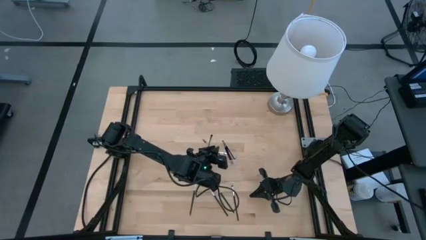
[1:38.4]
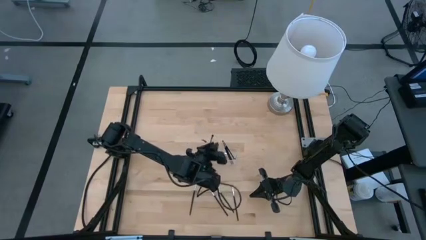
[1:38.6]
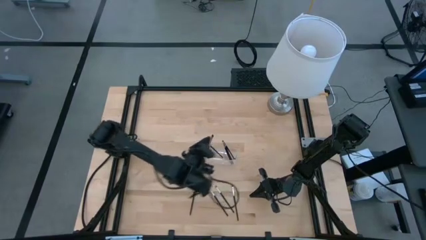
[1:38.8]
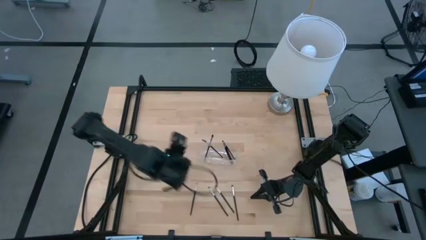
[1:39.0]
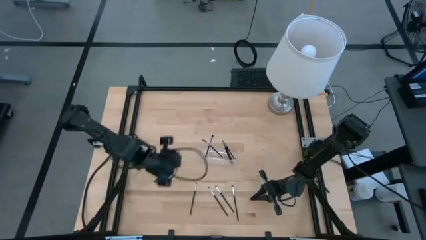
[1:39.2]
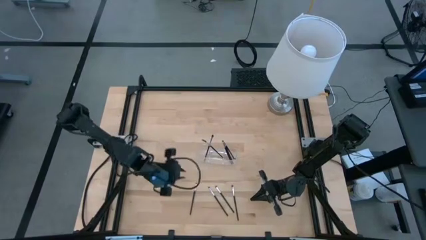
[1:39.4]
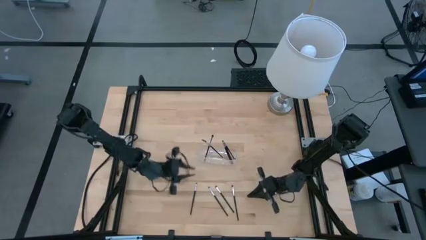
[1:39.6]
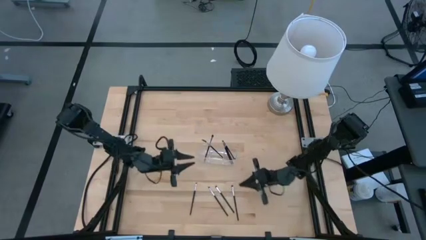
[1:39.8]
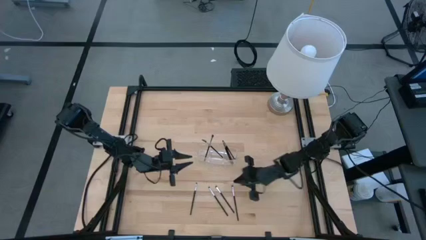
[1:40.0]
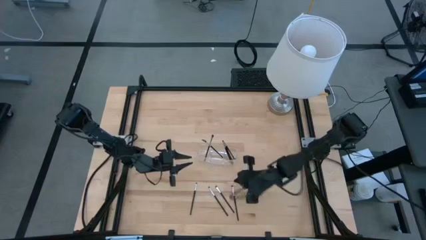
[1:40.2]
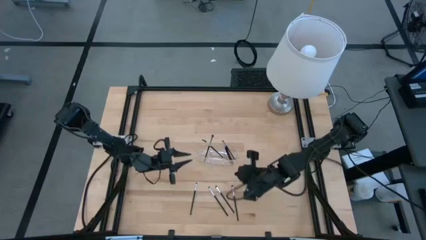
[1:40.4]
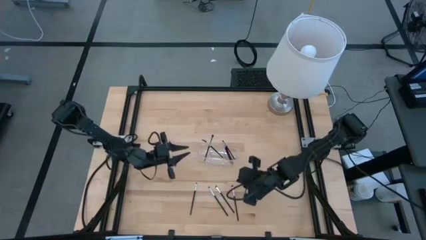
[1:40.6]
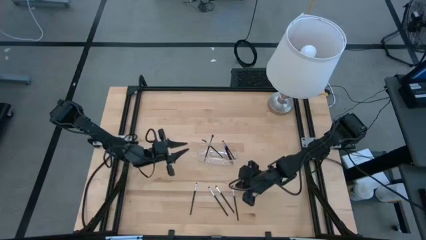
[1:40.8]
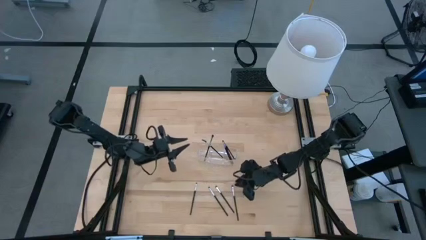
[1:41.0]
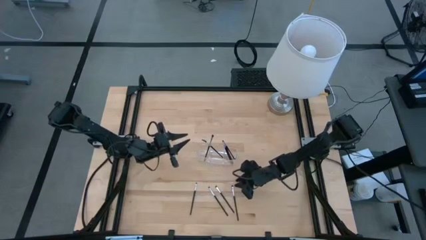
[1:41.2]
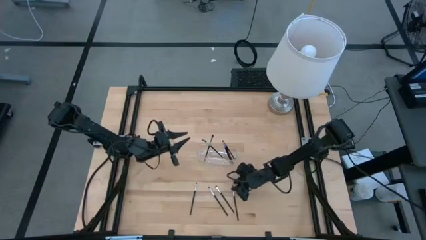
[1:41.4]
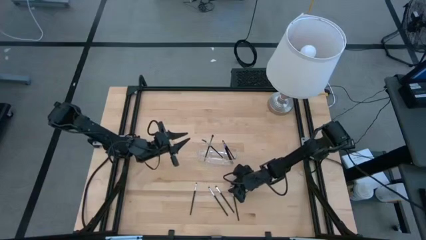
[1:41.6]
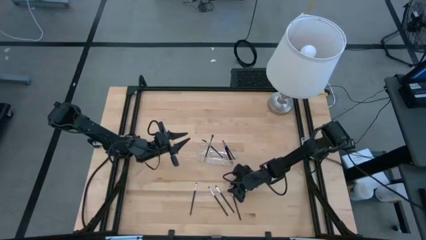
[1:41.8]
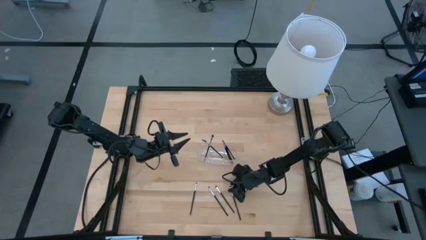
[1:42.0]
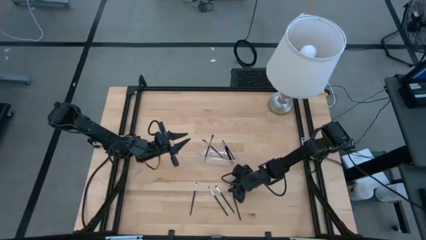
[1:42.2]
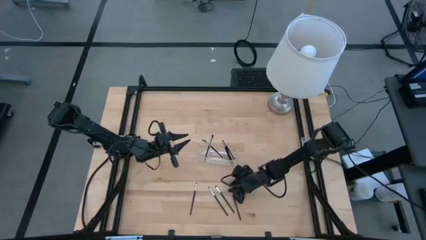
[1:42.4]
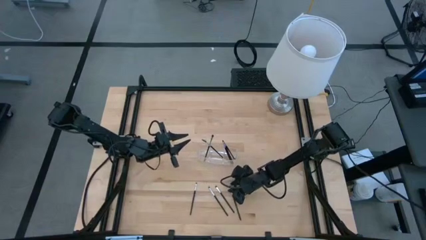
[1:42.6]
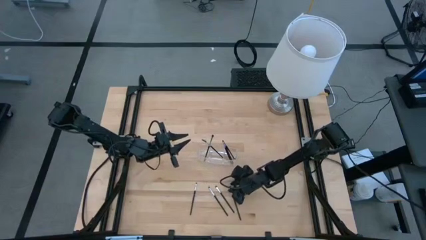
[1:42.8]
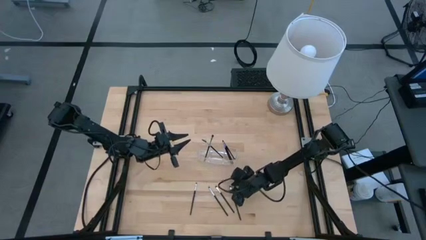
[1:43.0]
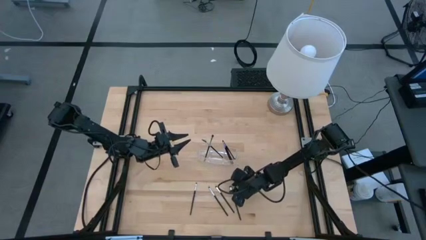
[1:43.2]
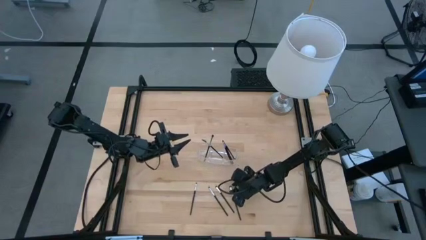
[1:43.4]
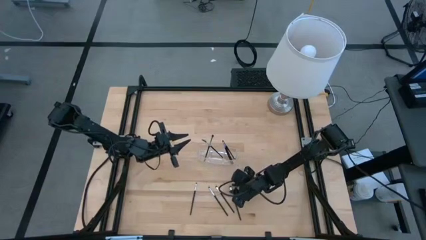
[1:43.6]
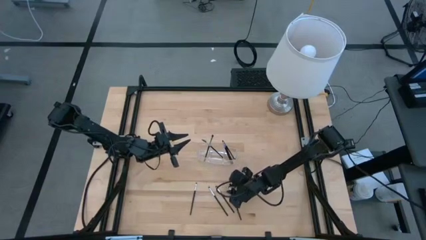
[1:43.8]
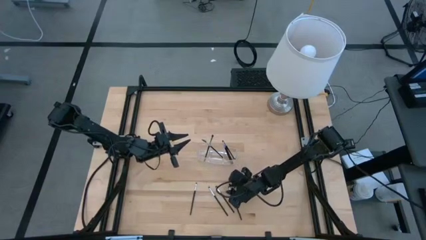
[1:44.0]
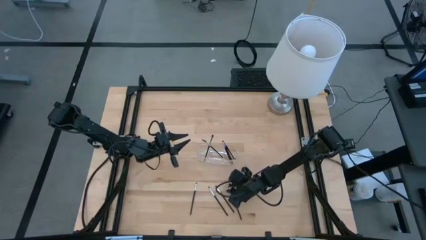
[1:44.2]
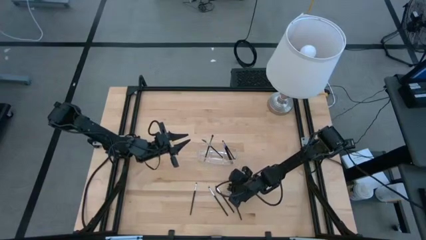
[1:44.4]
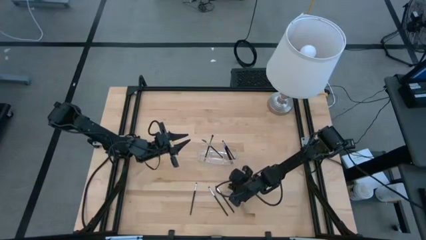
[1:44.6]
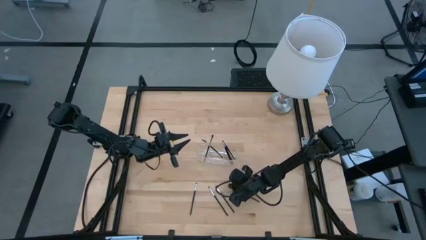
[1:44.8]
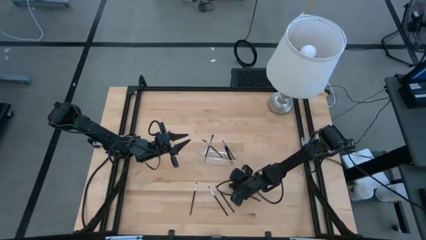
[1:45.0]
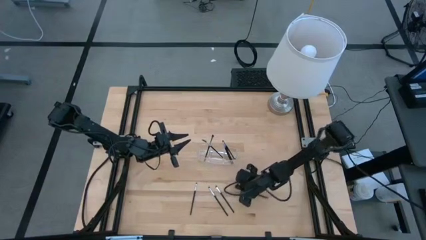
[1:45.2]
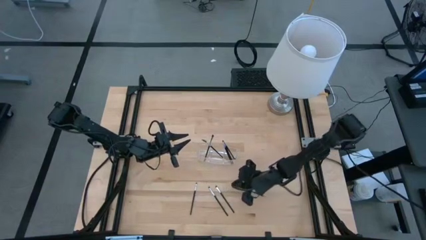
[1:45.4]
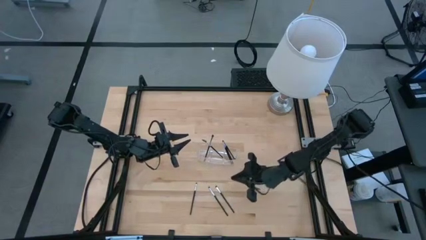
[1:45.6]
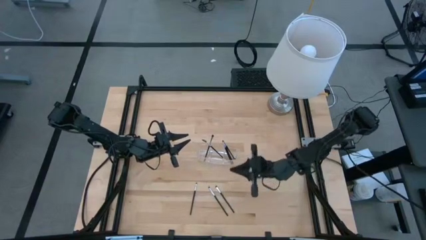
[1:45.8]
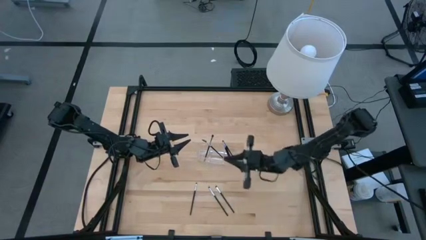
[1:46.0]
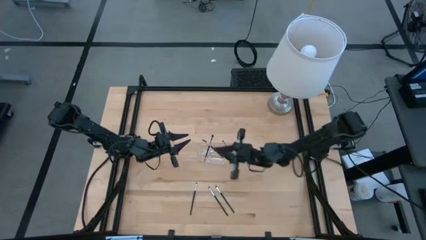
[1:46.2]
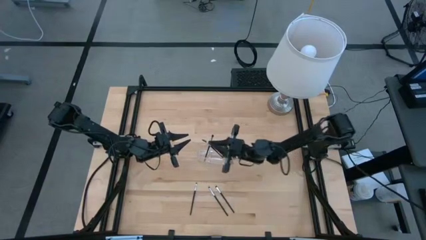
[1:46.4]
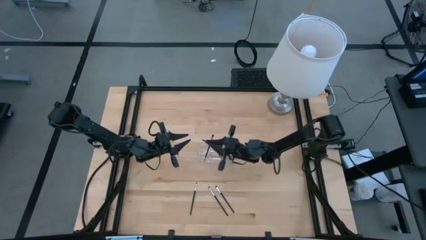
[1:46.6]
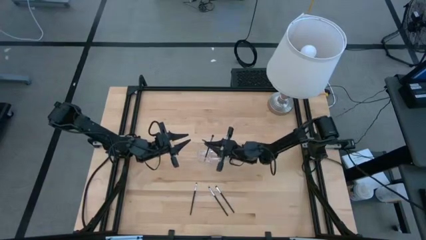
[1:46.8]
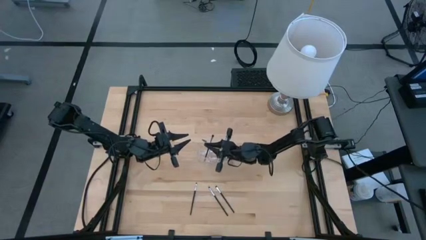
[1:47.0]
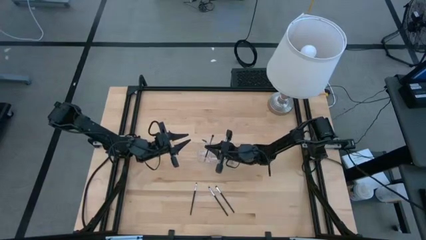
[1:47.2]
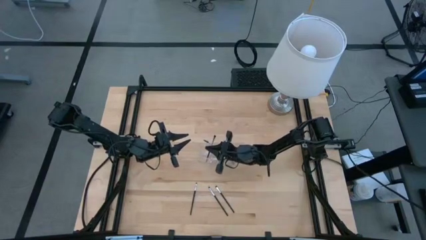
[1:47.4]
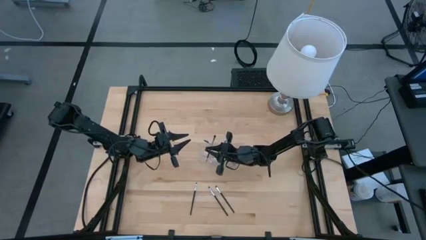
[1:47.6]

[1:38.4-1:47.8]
Task: Put items in baskets/containers
Put the eyeshadow brush in the transparent organizer

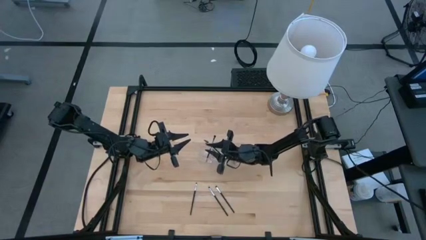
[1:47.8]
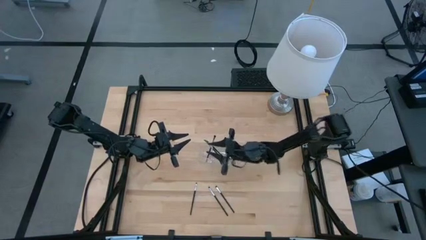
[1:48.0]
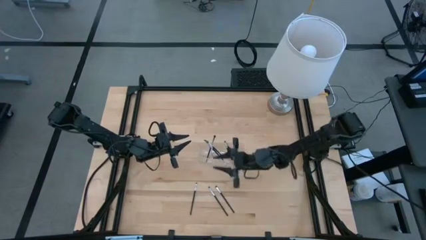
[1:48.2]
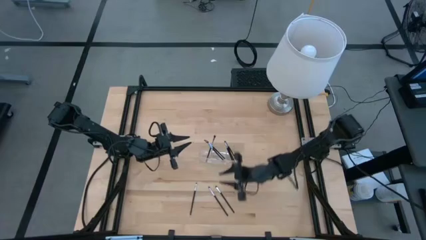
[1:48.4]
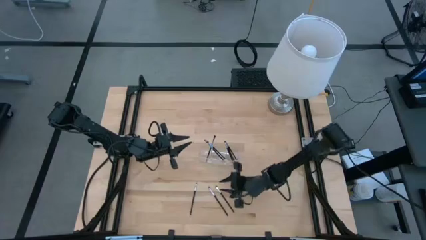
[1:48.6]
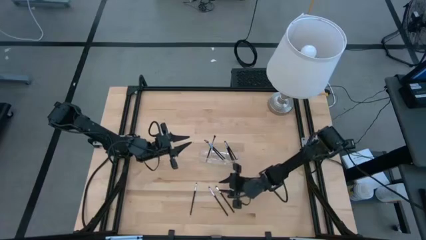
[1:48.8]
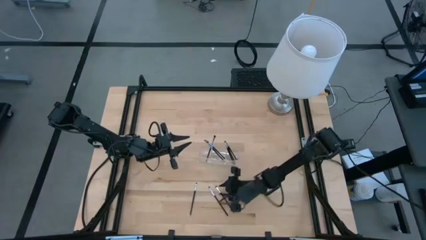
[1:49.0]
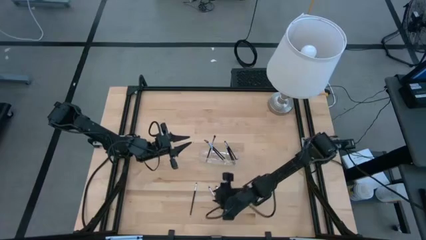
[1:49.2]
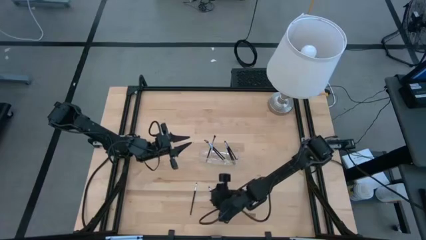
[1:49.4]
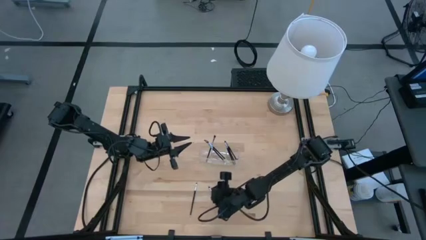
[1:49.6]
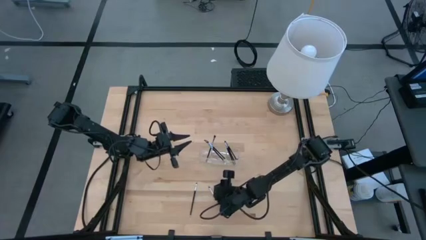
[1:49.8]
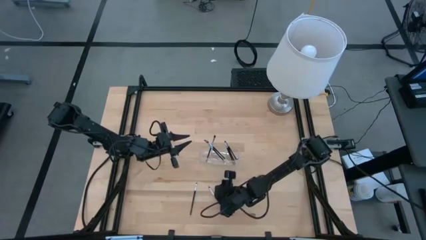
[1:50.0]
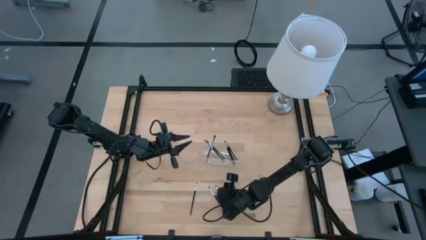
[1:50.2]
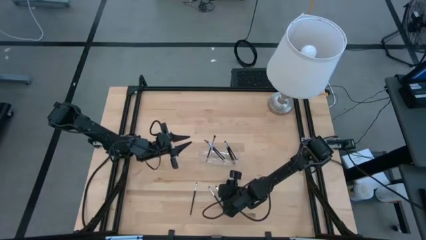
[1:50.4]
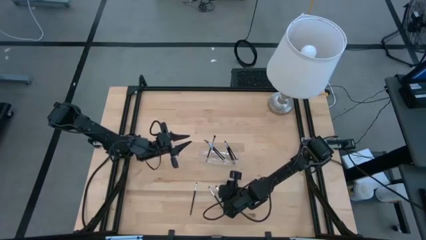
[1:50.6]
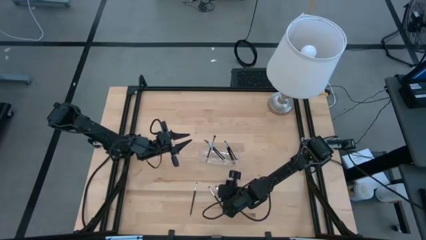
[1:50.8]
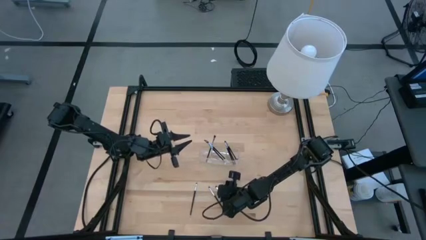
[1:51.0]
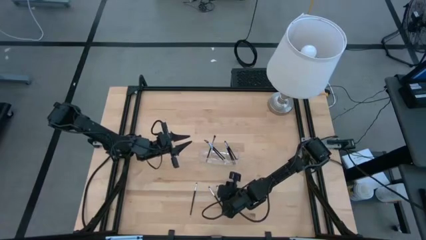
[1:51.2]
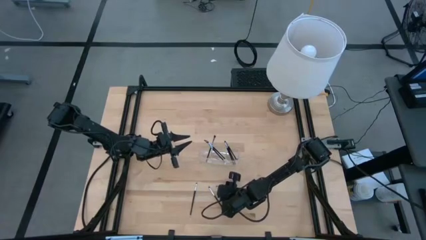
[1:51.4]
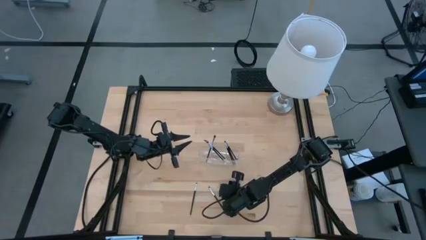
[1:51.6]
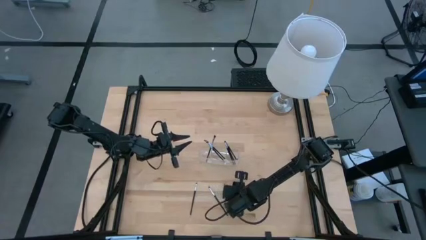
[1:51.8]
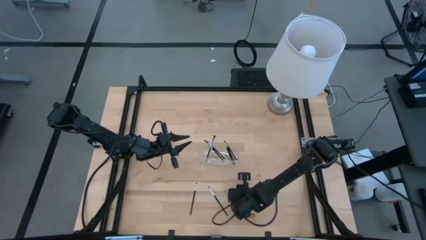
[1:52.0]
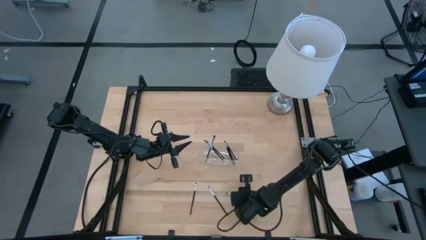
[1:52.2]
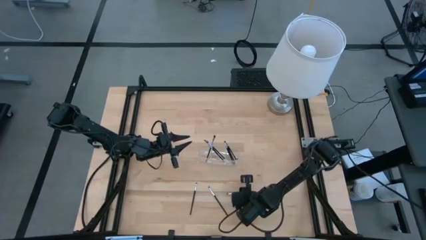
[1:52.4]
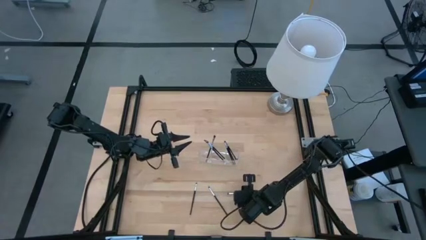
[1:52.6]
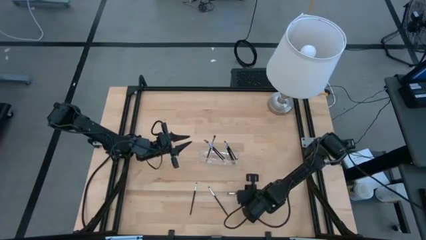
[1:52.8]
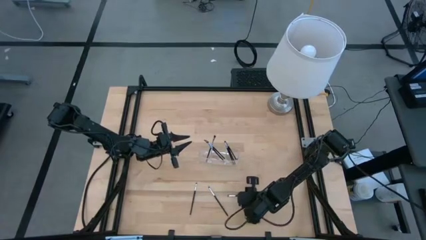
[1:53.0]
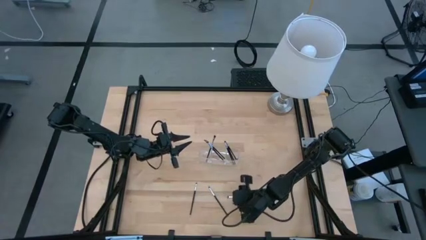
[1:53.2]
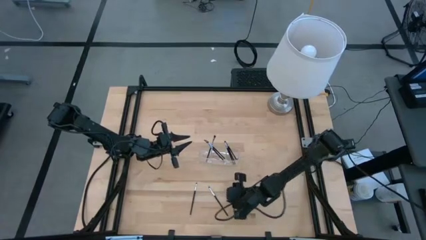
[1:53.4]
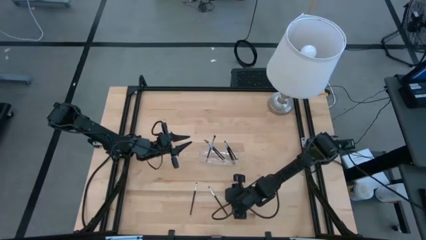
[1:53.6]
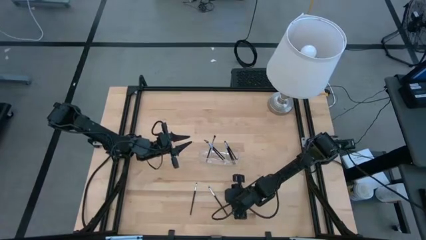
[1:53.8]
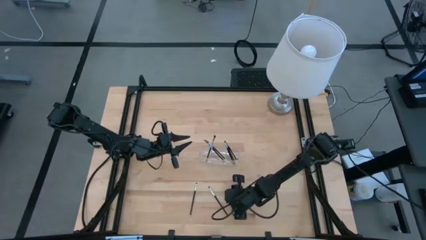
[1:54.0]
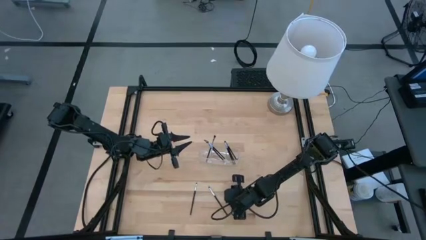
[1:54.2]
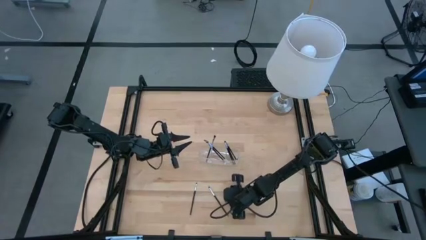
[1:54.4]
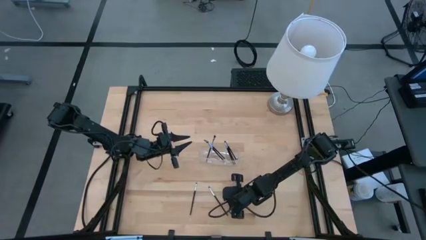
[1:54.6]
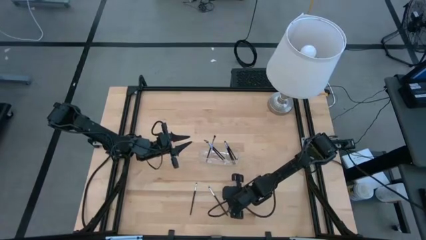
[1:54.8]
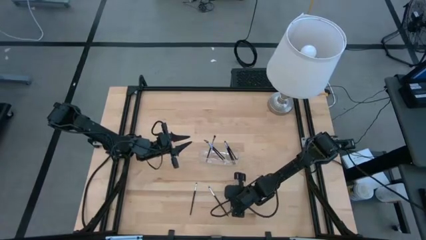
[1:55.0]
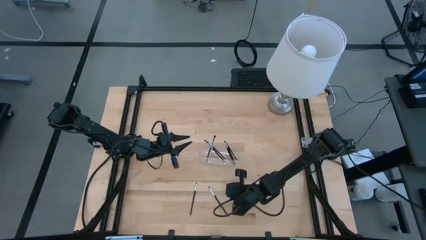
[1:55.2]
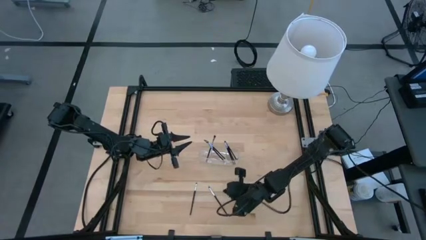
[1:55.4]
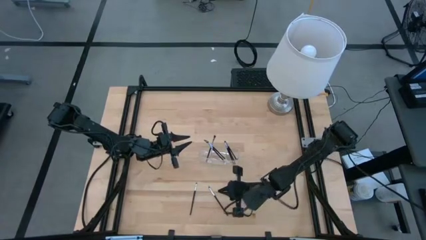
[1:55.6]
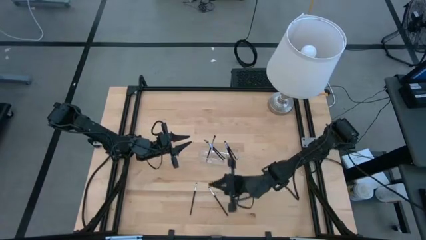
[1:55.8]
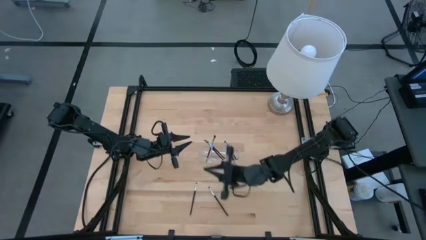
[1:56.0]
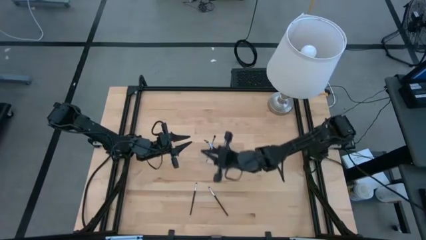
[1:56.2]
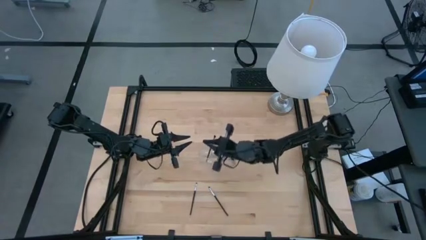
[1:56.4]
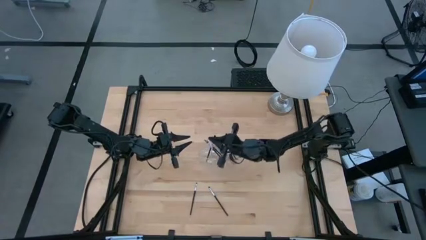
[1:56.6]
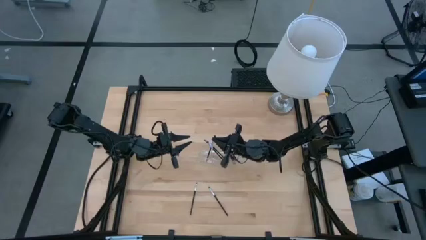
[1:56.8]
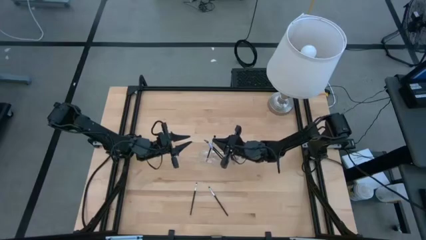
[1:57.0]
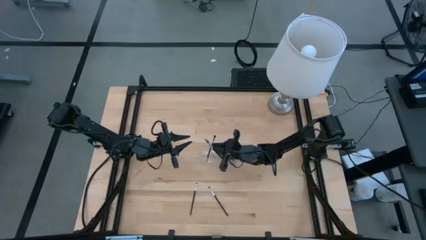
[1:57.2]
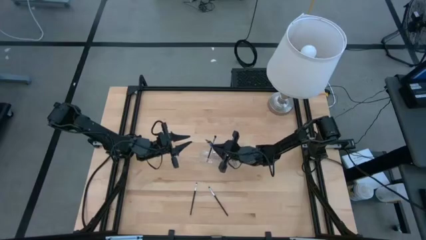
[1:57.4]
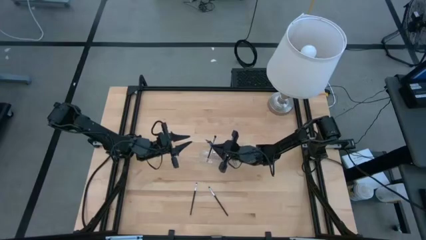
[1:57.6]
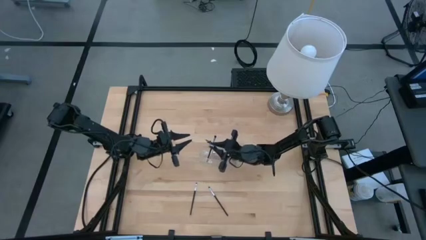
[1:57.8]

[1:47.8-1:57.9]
Put the eyeshadow brush in the transparent organizer
